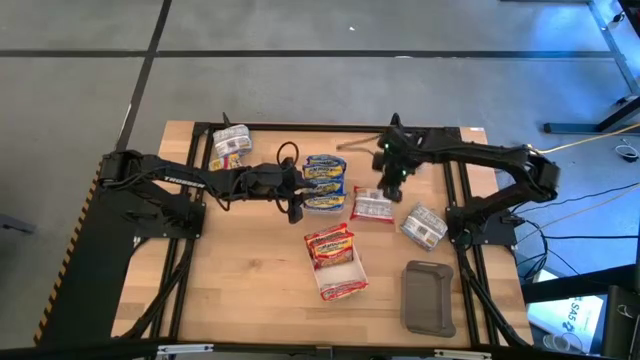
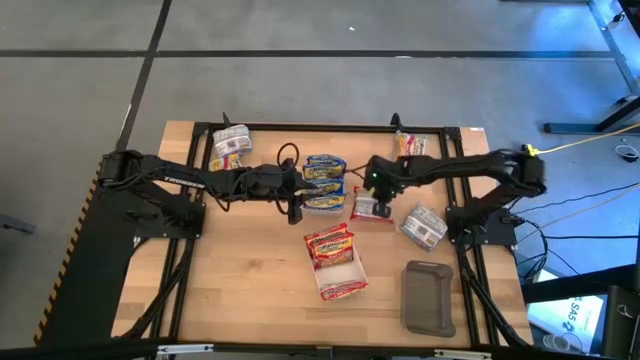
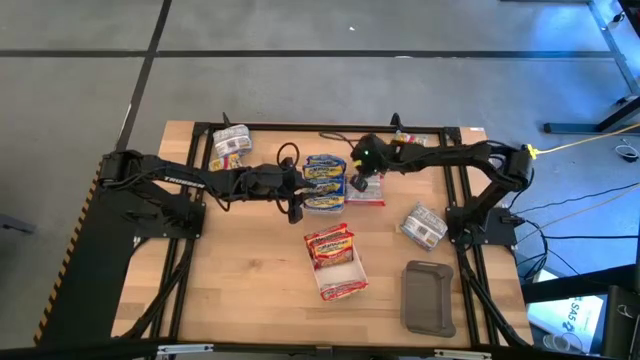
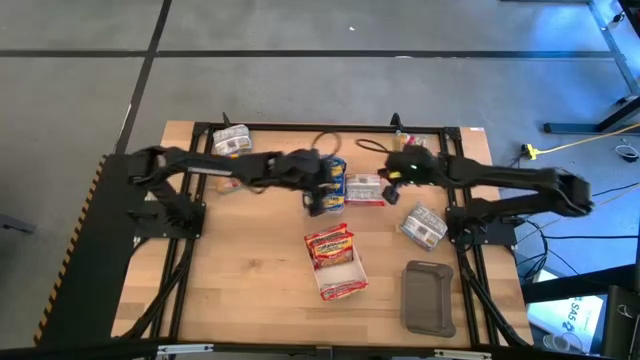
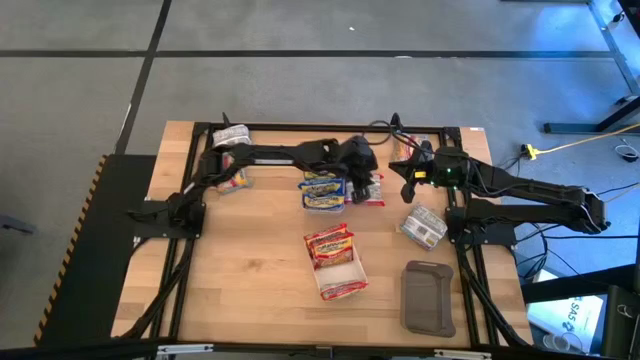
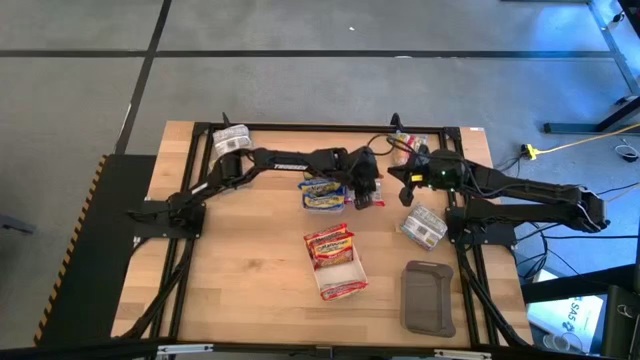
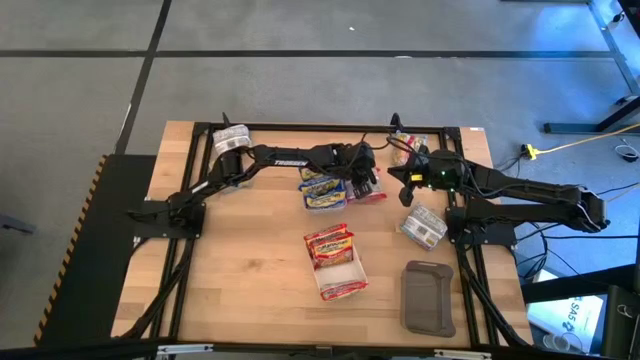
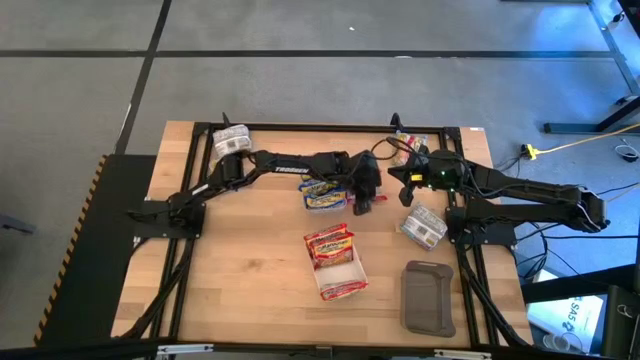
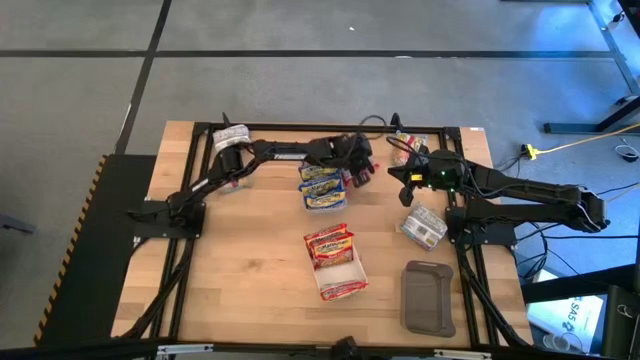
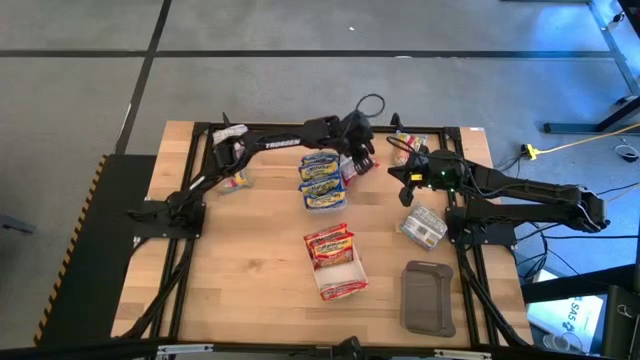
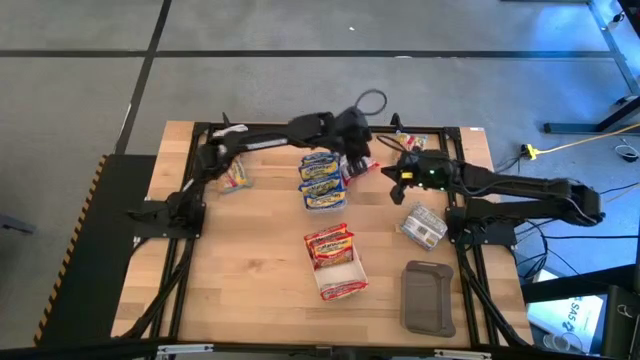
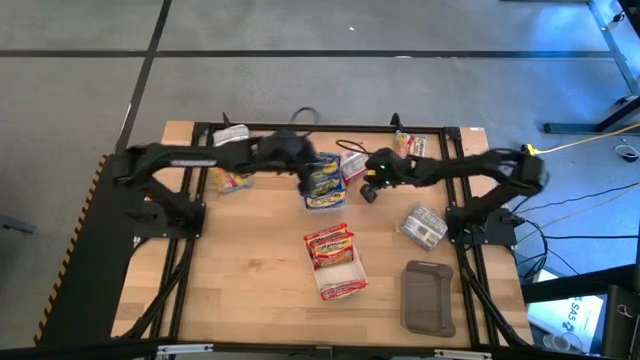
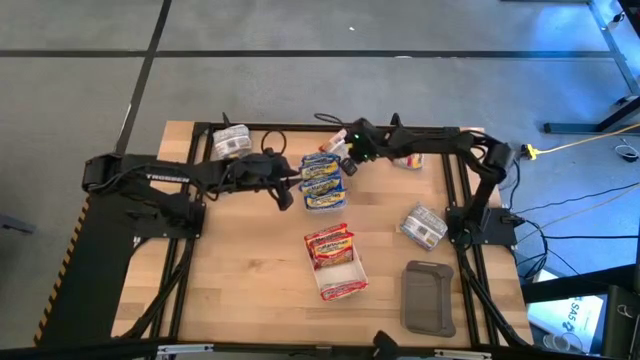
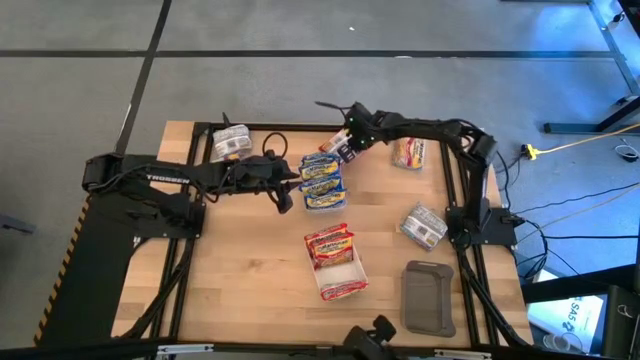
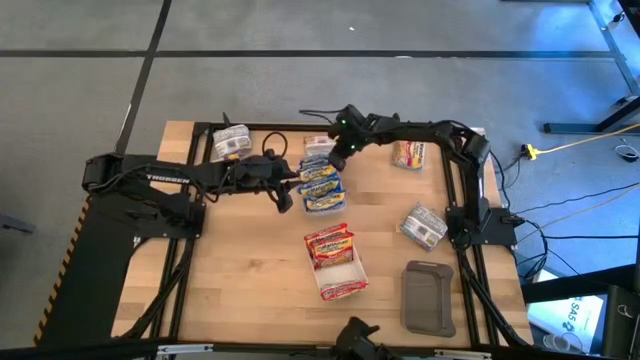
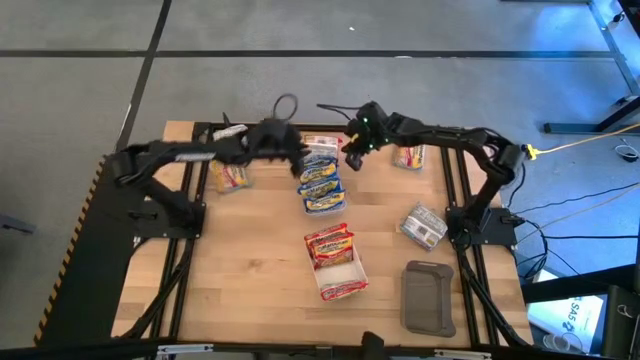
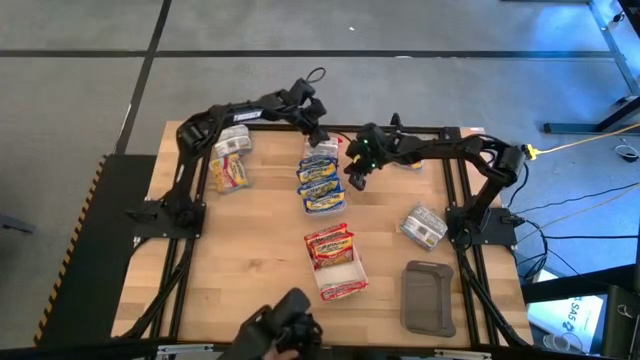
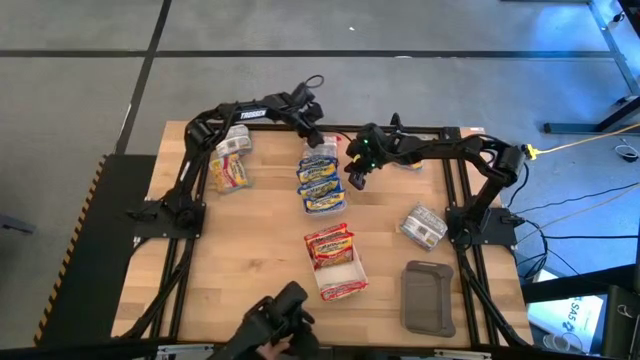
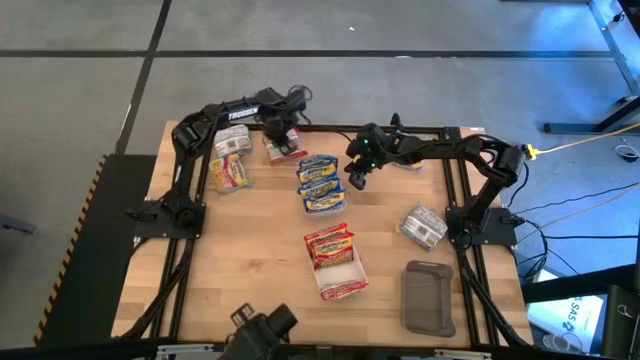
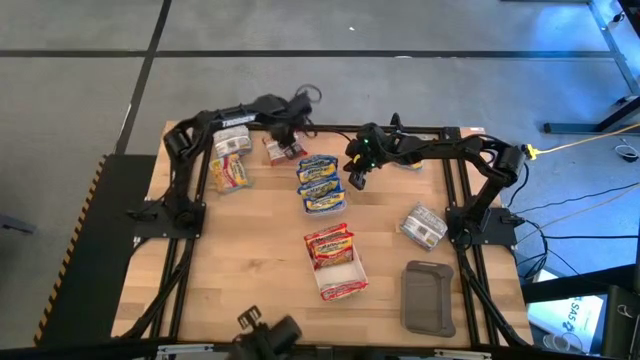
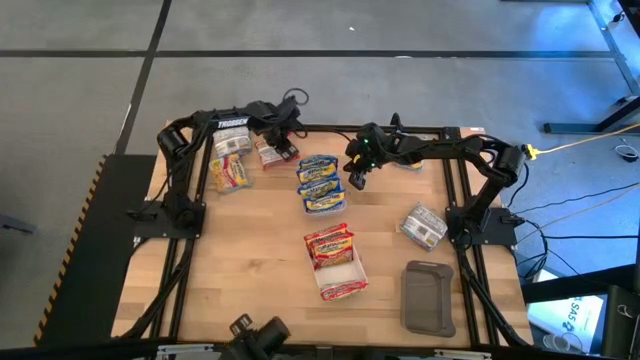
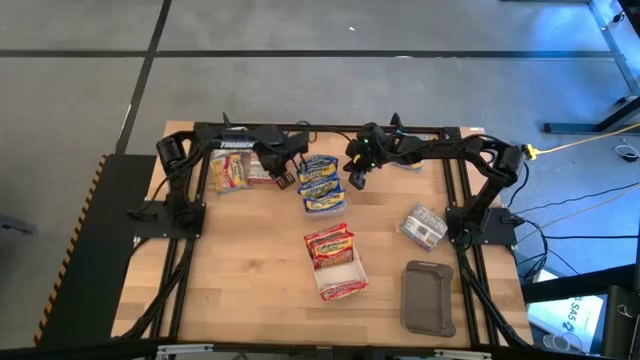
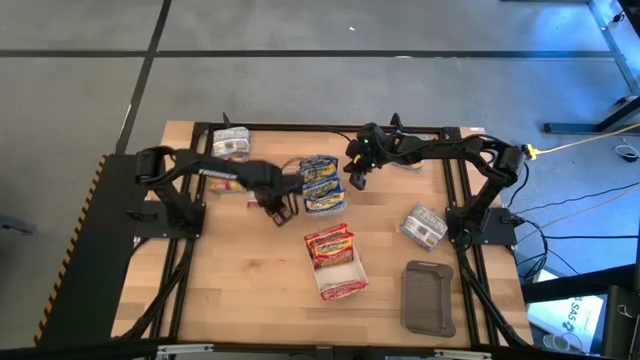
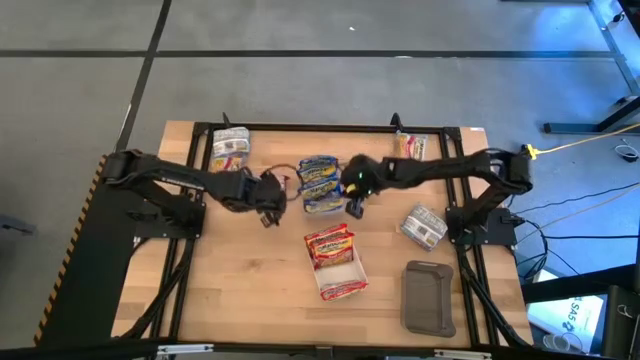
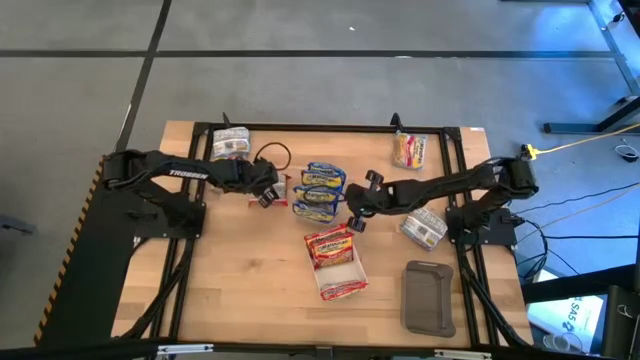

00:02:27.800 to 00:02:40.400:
Task: Sort Maruchan noodles
Put the red noodle pack into the white bin

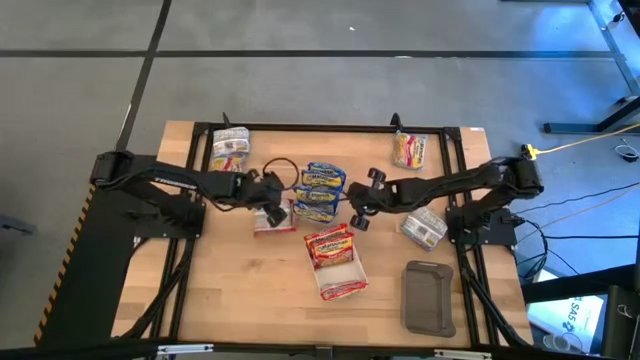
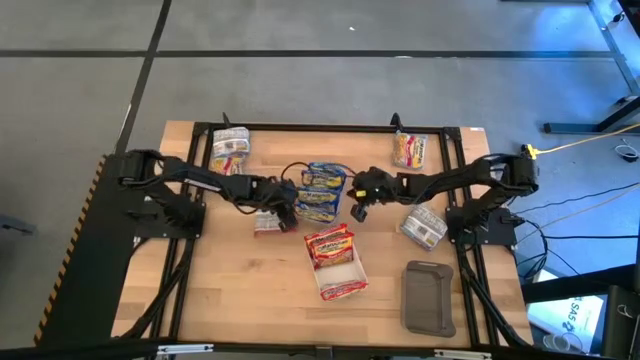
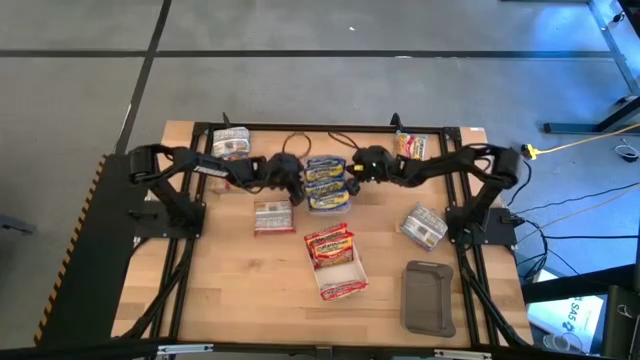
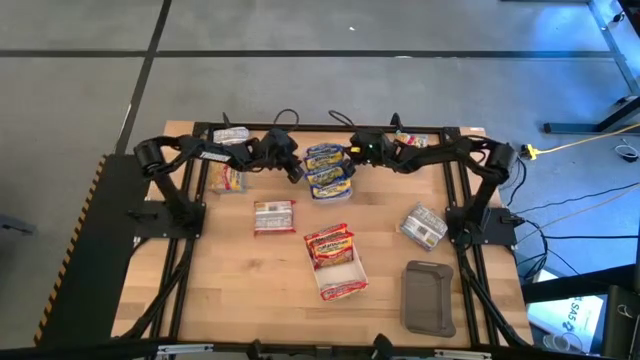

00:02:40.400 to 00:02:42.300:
Adjust the transparent bin

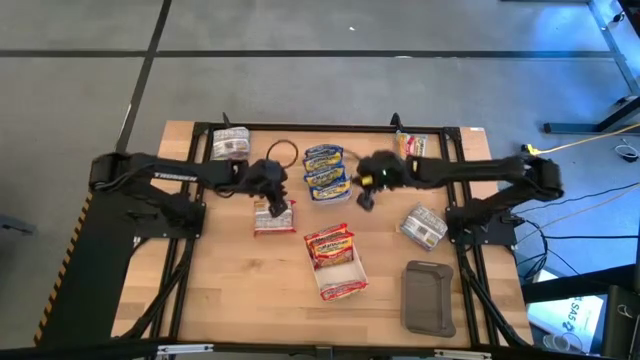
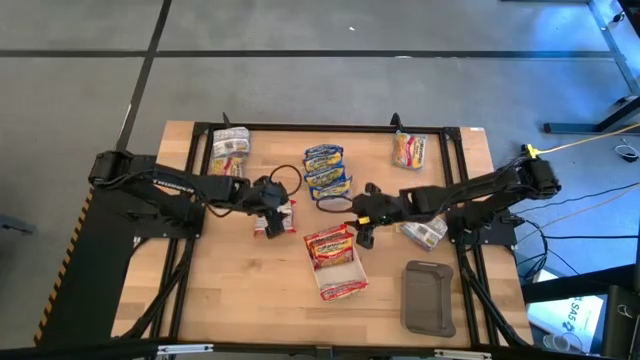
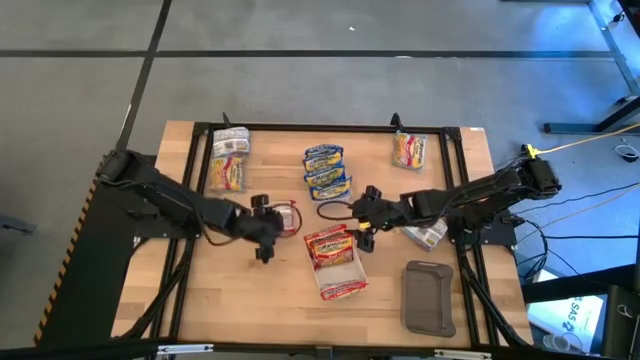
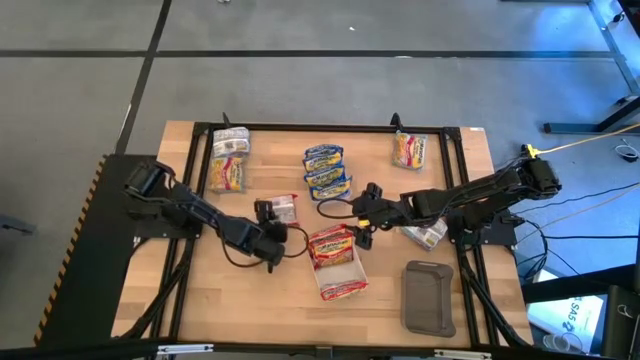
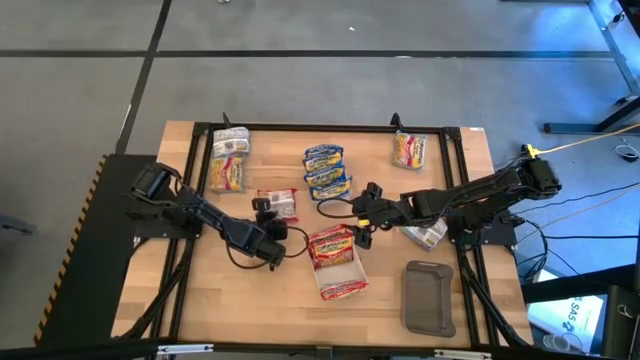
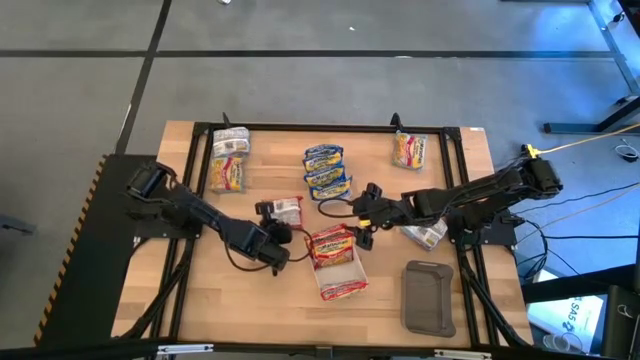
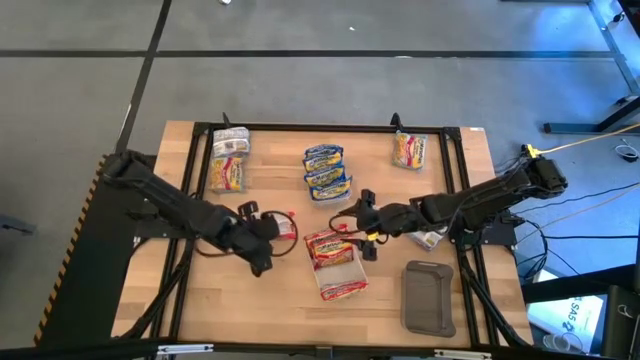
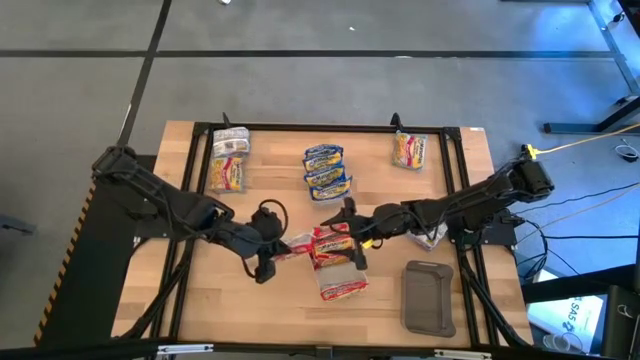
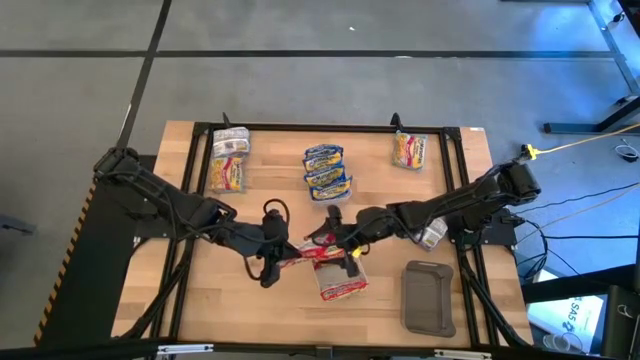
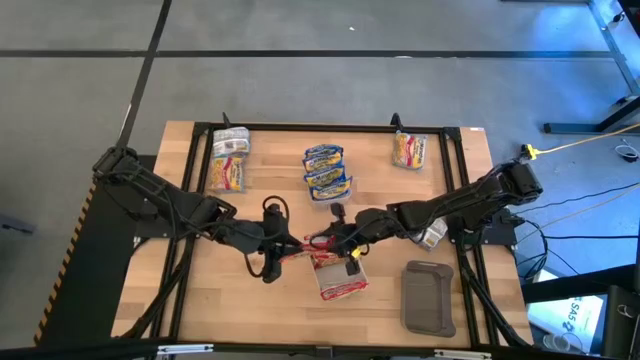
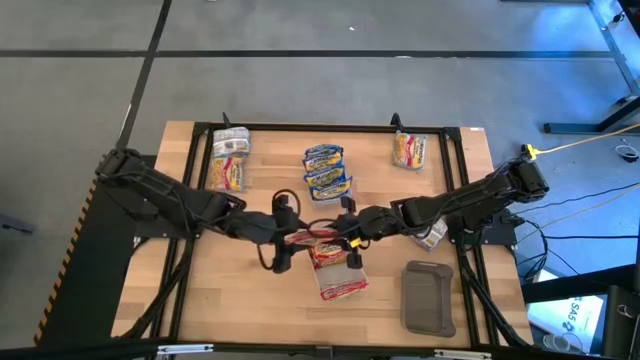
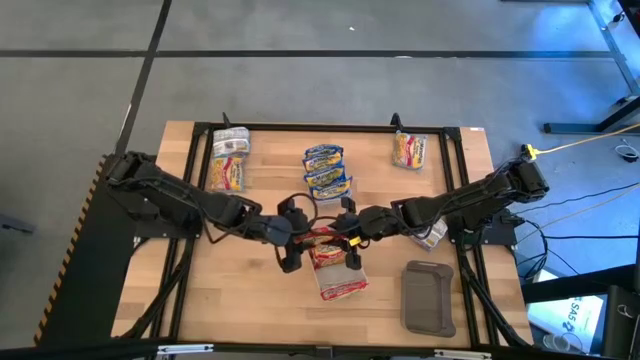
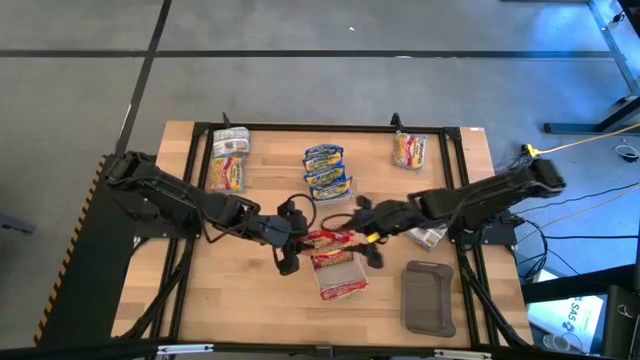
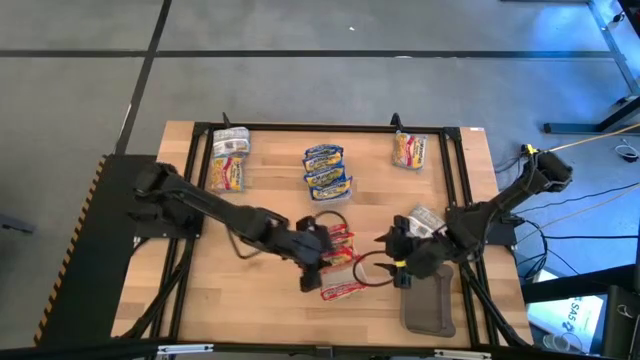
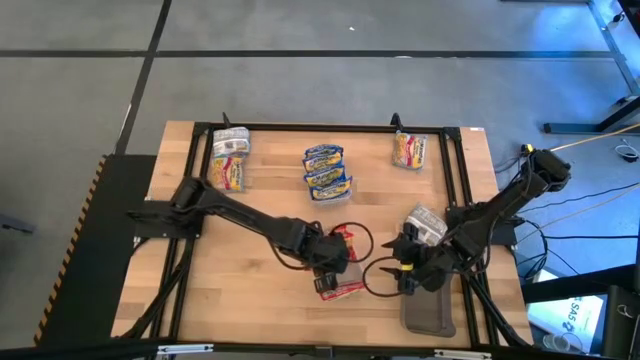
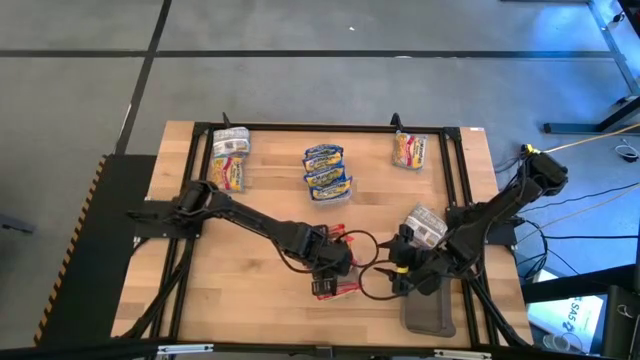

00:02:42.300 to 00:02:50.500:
Put the red noodle pack into the white bin

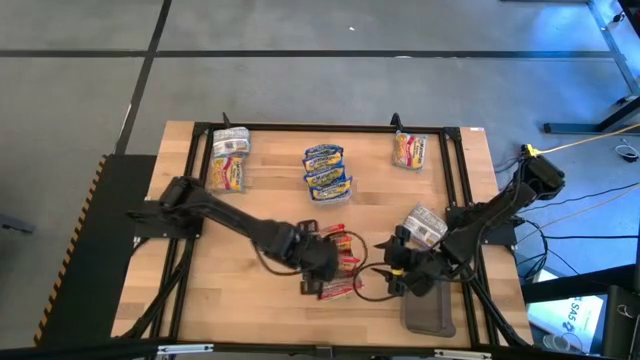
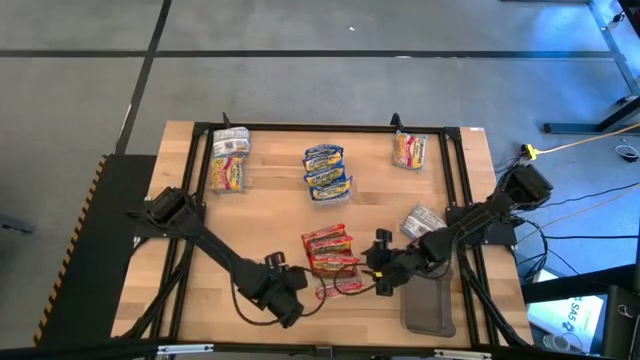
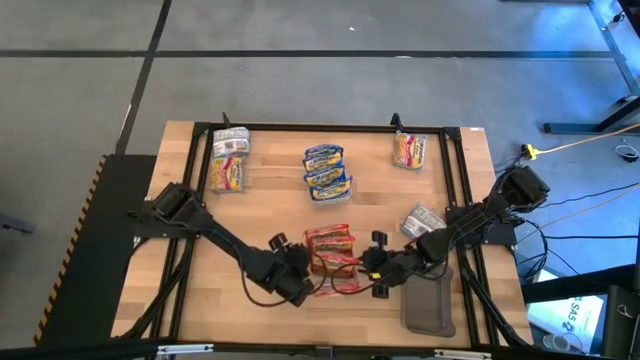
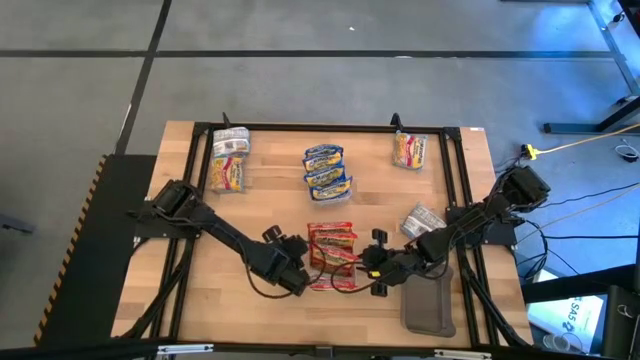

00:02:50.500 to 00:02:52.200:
Adjust the white bin
